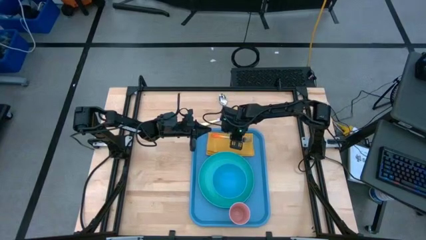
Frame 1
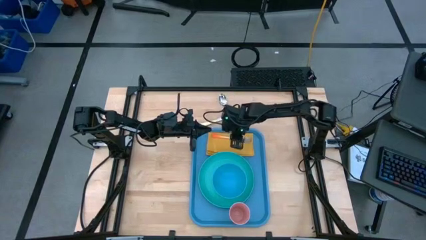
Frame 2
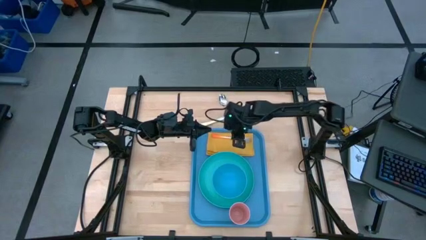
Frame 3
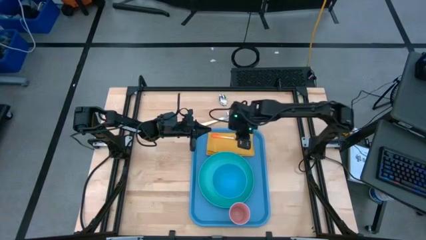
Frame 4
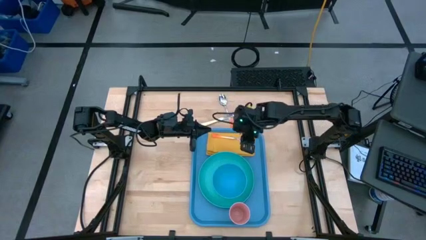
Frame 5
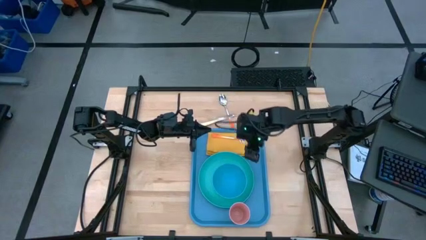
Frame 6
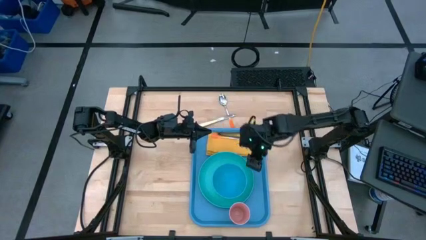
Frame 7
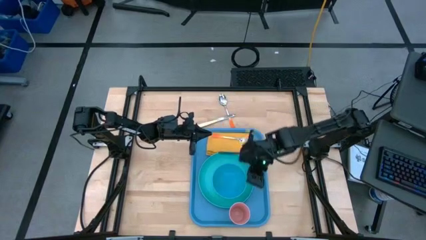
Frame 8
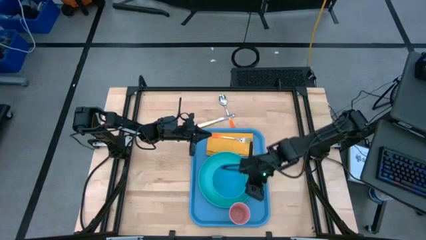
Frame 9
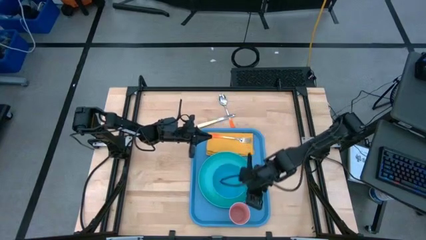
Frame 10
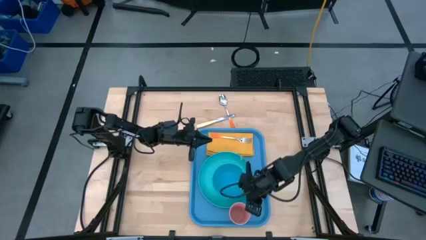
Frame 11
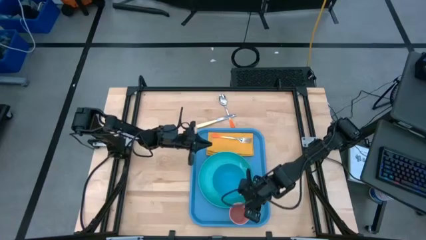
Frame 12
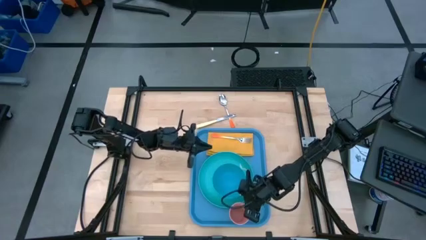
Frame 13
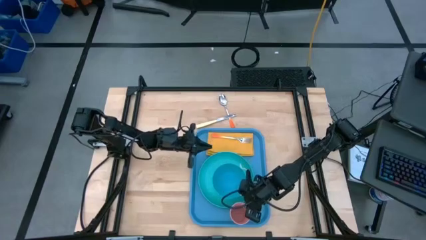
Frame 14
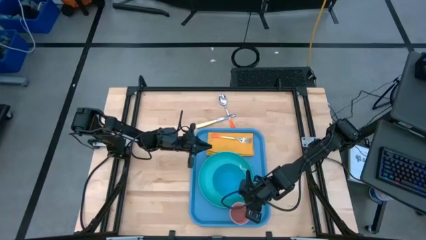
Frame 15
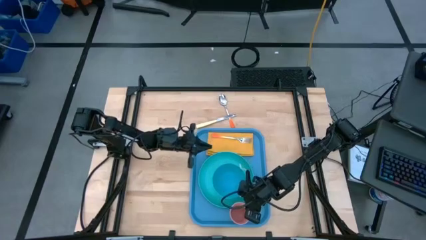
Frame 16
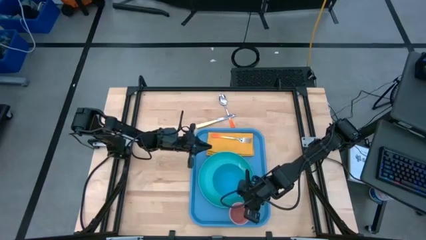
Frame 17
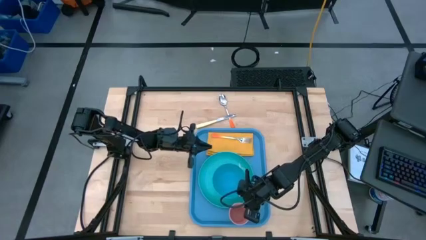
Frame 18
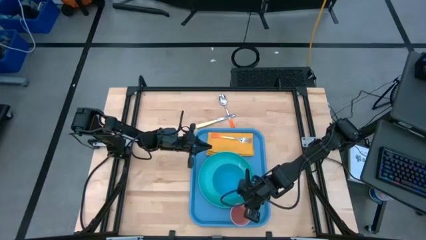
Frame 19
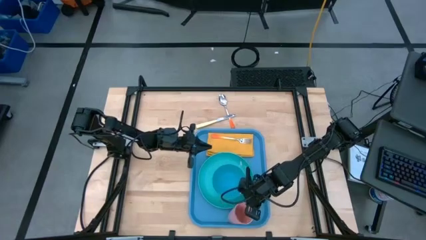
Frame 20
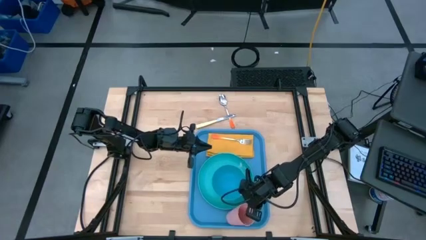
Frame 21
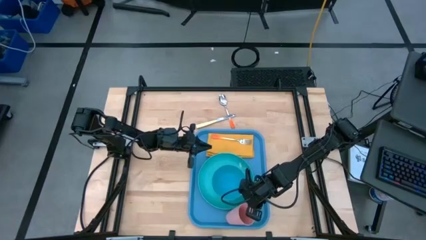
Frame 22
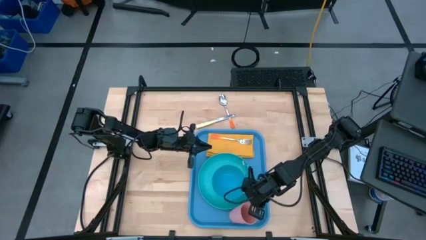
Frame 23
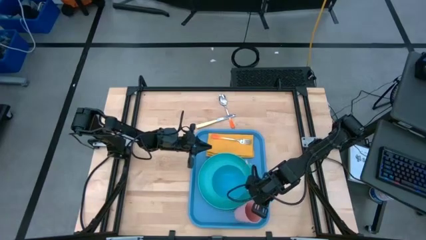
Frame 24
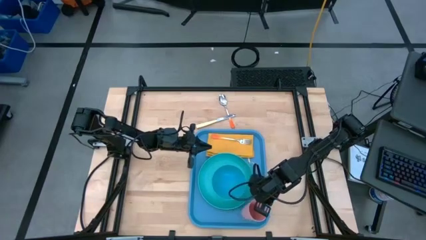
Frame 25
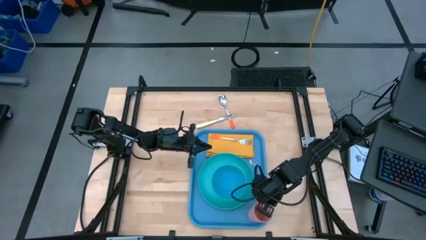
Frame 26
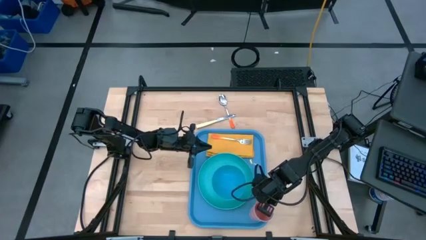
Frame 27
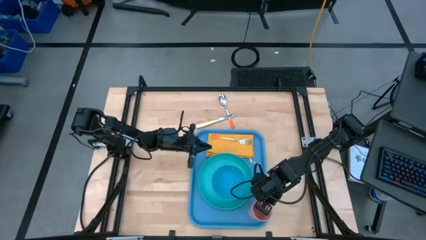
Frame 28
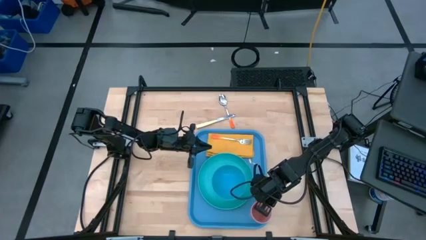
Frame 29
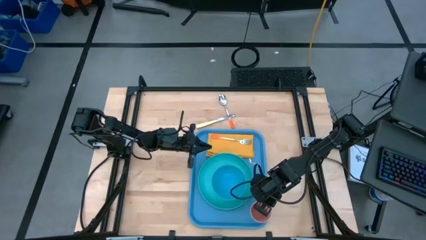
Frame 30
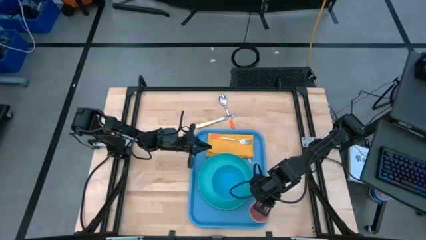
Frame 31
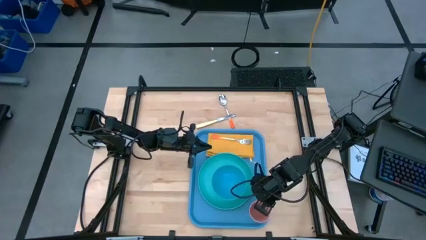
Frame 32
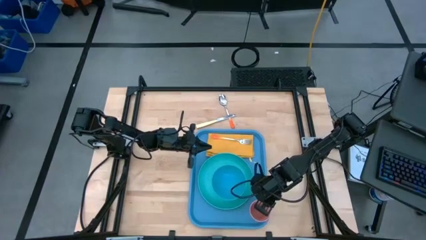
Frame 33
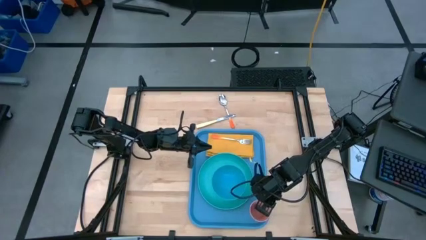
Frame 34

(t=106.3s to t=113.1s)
Task: Set up tray
Adjust the pink cup on the blue serving tray

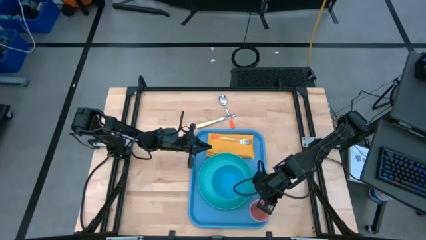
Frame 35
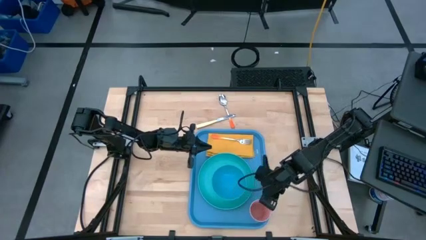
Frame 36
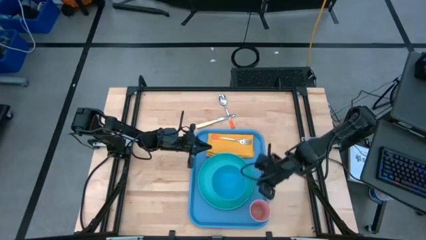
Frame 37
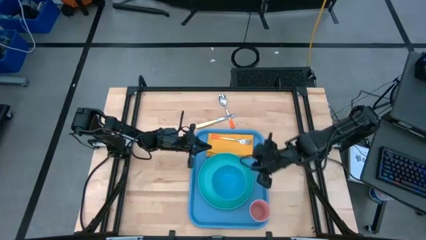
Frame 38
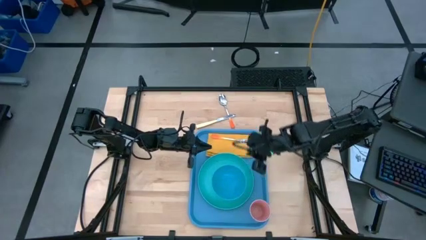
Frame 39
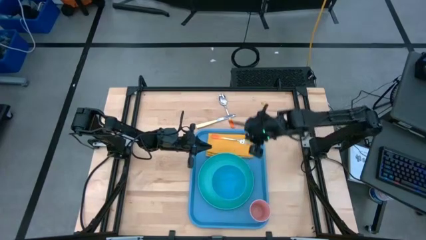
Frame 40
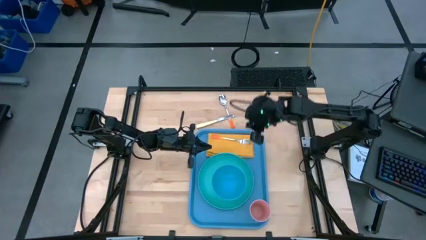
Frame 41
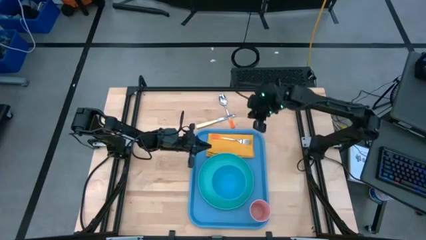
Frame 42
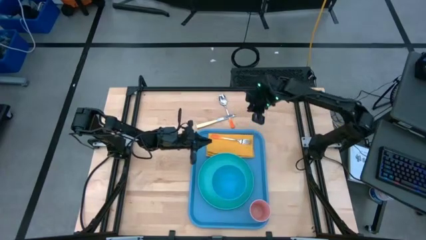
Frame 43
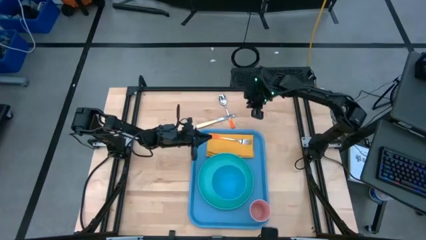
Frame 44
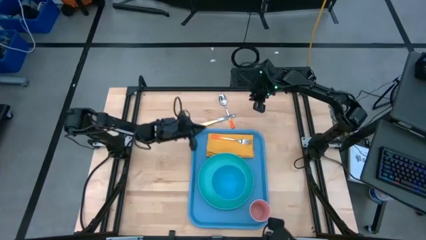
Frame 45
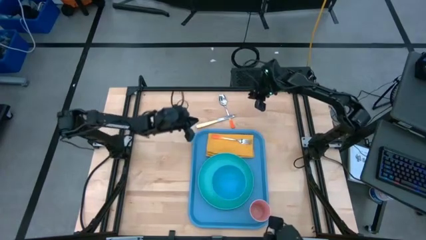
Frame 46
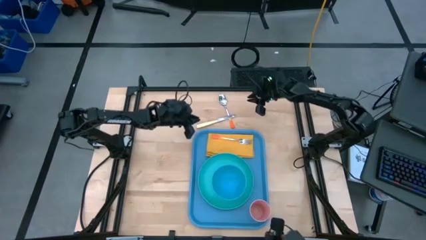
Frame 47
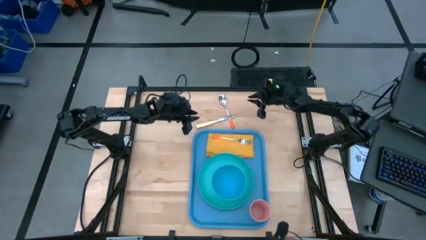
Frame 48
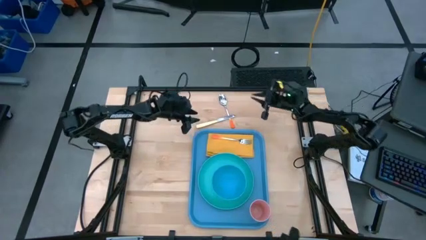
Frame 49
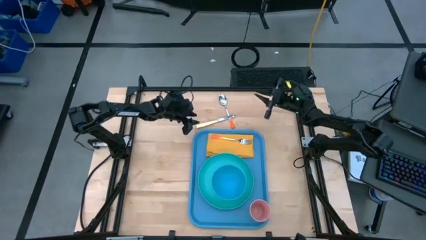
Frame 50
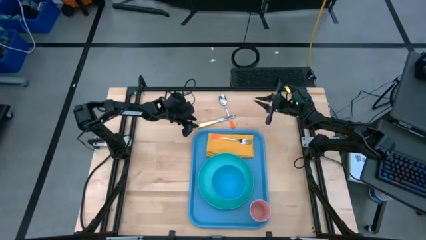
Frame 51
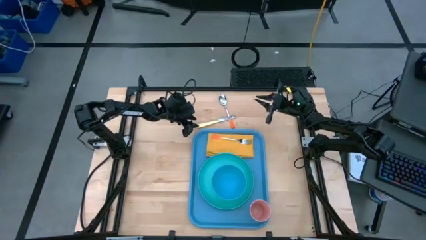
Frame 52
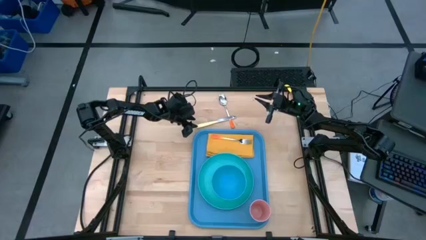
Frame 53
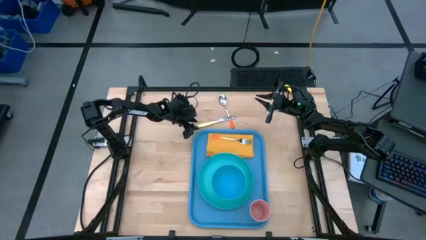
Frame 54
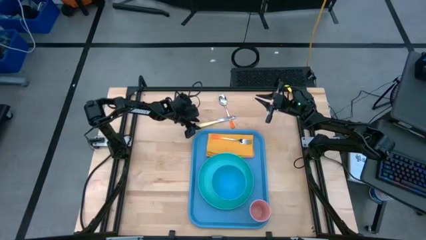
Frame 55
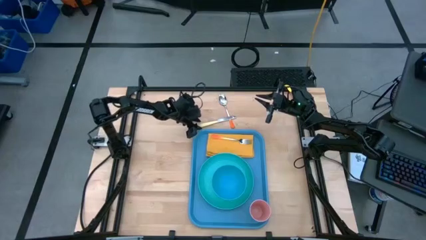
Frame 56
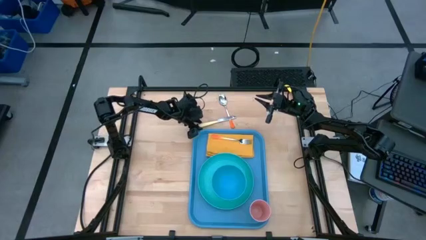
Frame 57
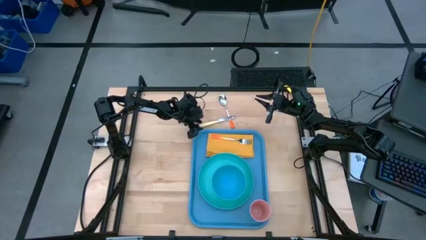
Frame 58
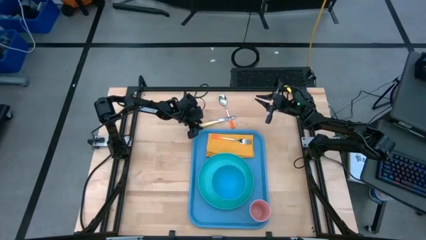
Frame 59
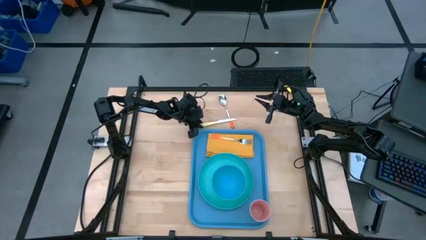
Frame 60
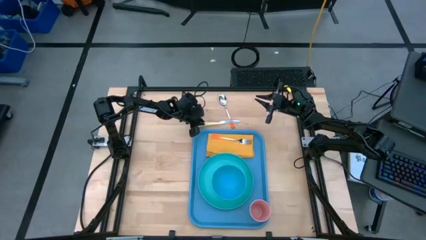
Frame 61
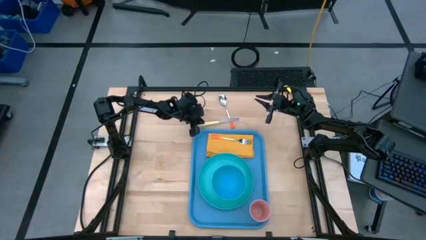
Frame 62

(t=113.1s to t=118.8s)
Put the yellow knife to the right of the orange fork on the yellow napkin on the blue serving tray

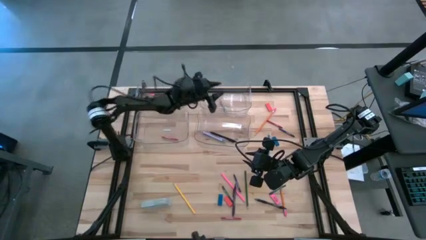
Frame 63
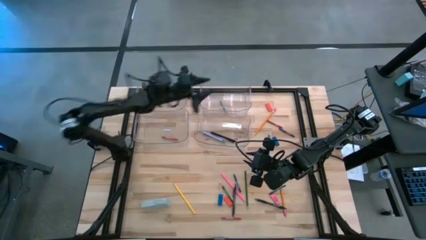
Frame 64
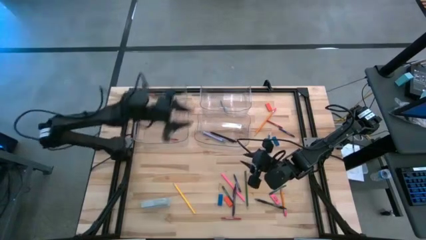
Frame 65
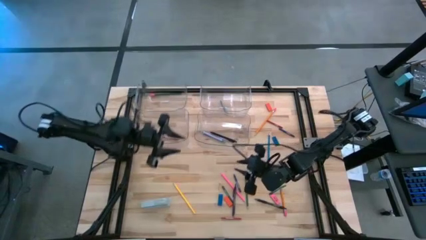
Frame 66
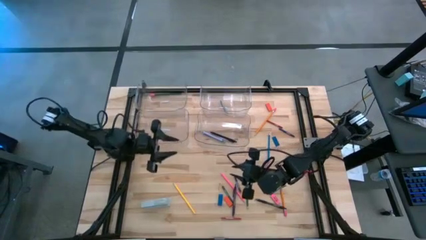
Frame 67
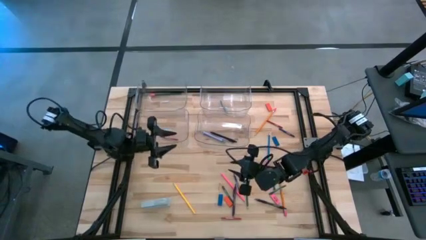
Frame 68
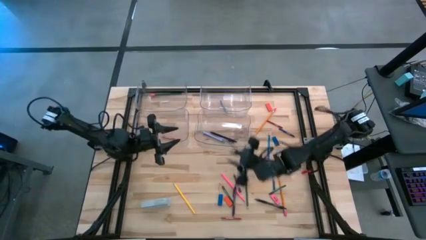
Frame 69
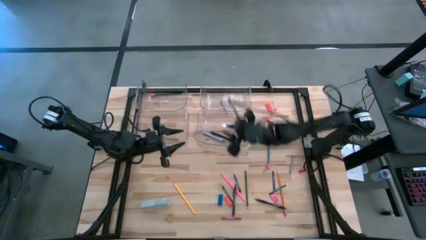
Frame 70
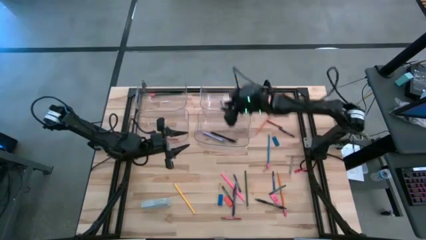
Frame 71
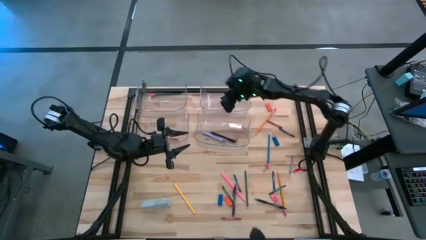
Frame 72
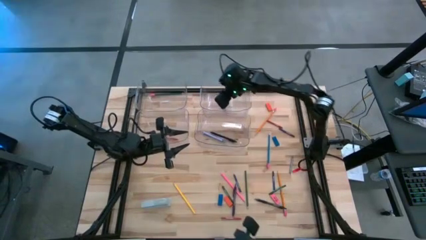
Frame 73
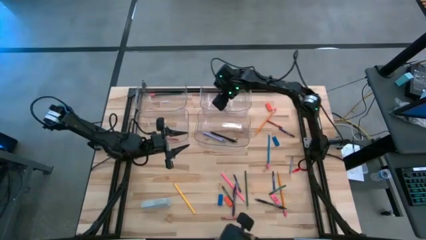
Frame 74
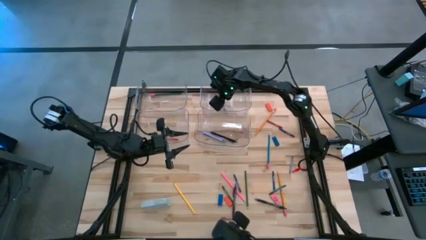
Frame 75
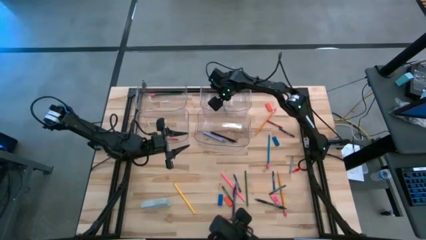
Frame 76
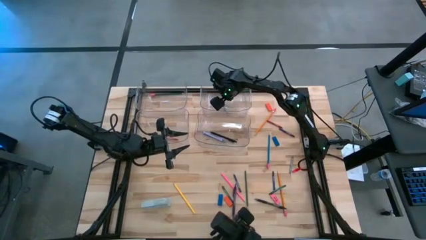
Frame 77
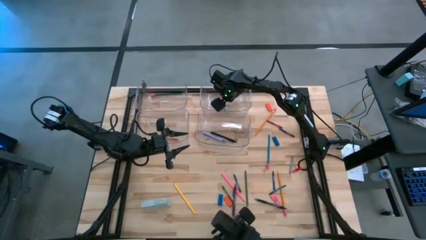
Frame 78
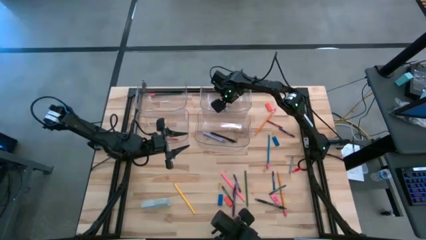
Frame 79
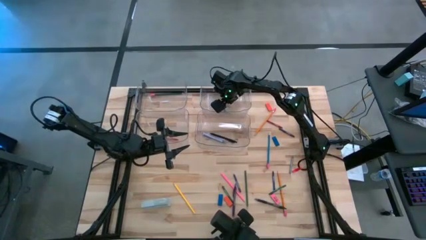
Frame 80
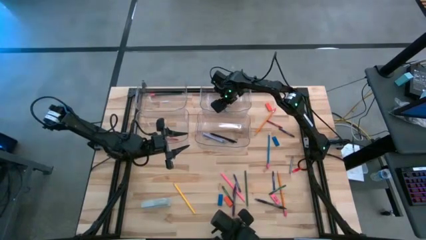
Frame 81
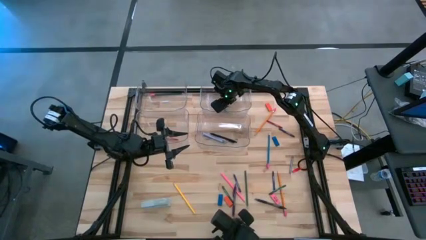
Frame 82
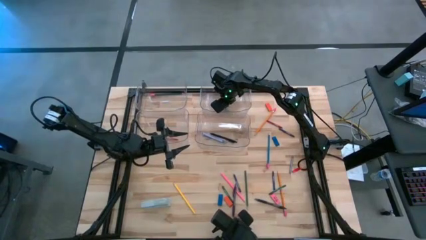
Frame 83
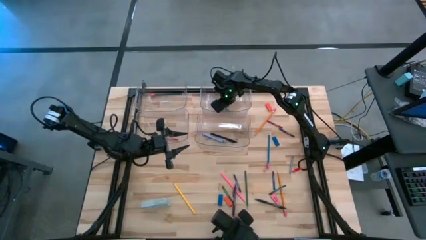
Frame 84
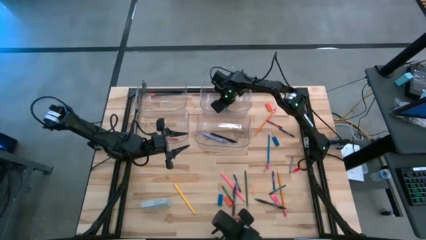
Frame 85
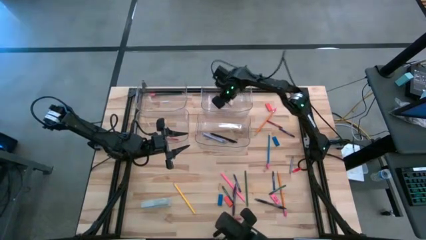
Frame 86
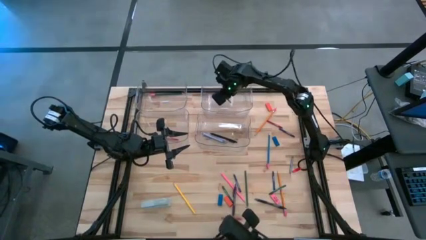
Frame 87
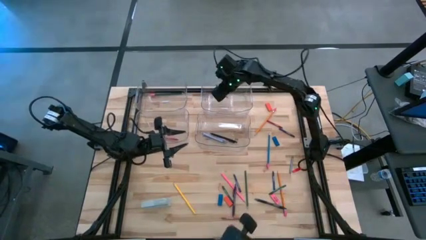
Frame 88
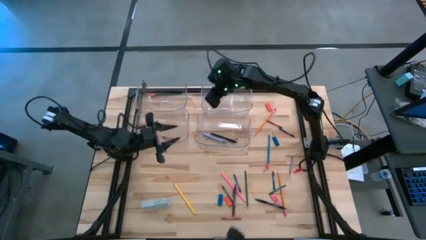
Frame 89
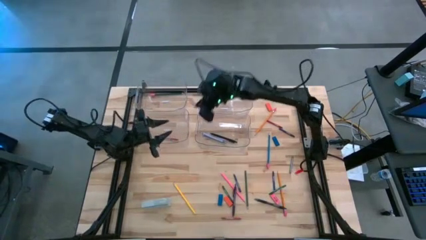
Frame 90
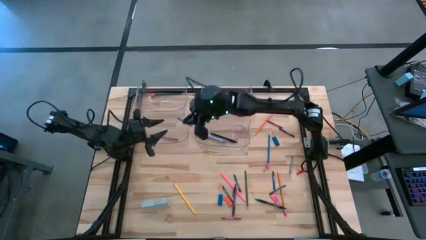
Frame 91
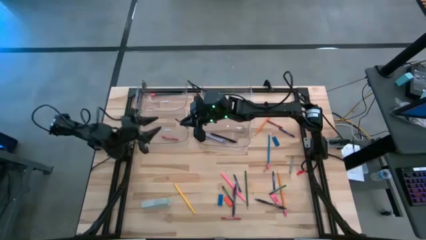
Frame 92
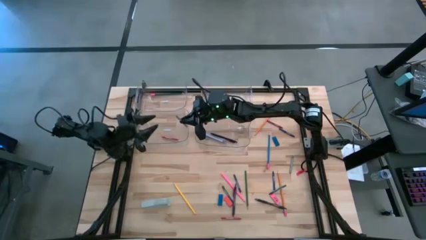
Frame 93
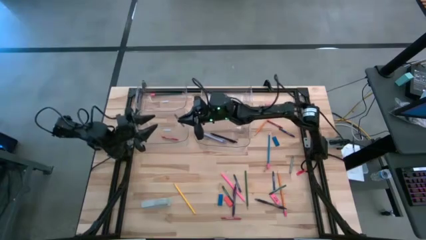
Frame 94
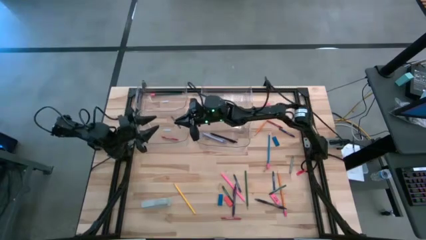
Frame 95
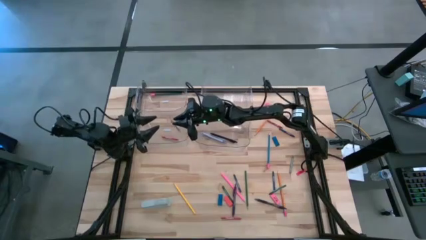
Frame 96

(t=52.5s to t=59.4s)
Task: Sort crayons/erasers/pens/pencils in bins
Move the gray crayon from the top right transparent bin to the bottom left transparent bin
